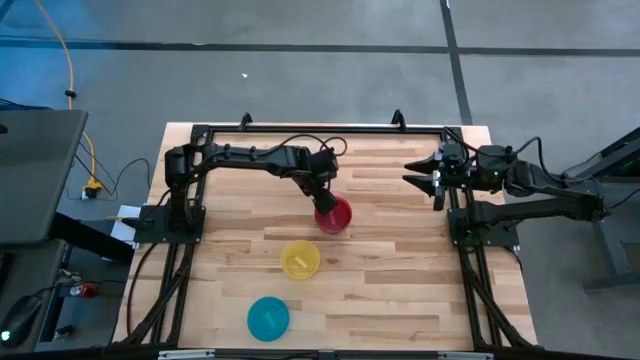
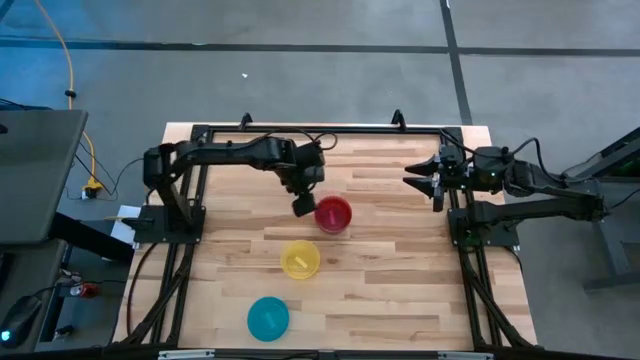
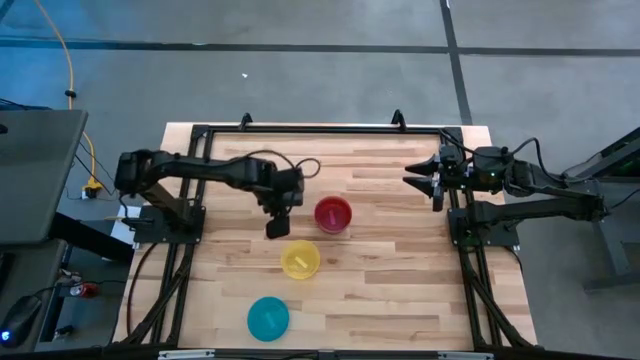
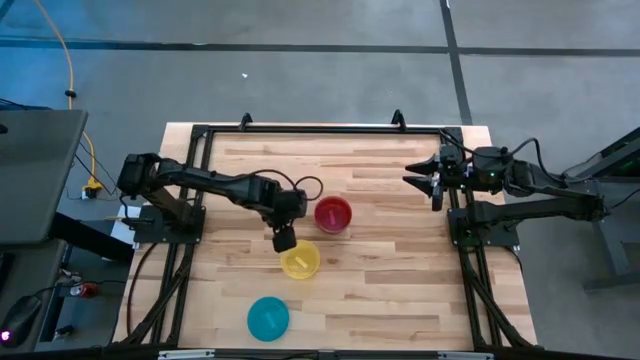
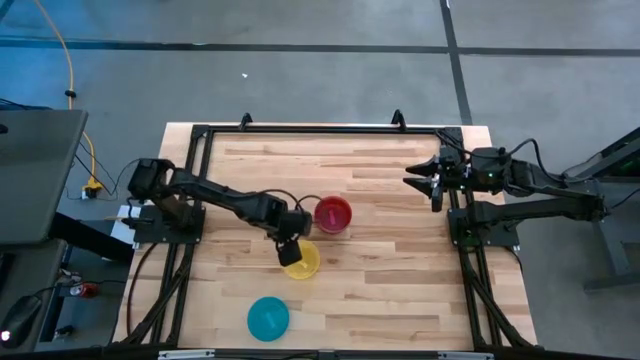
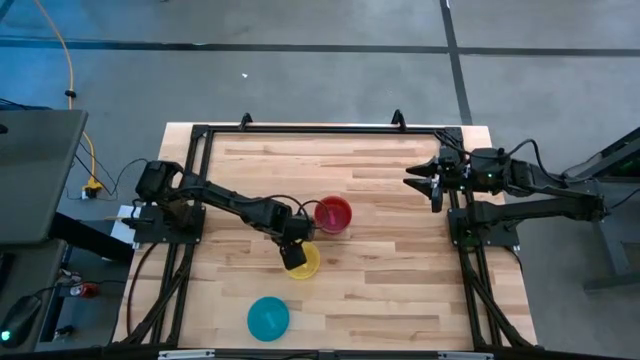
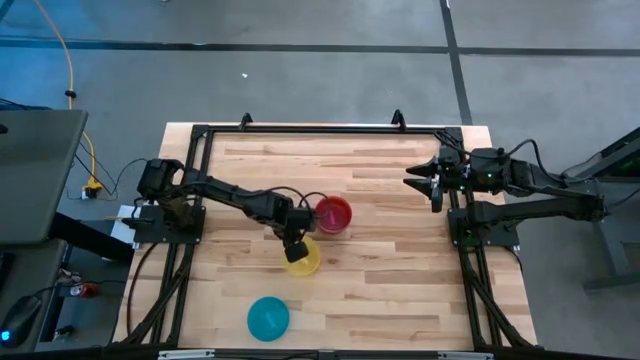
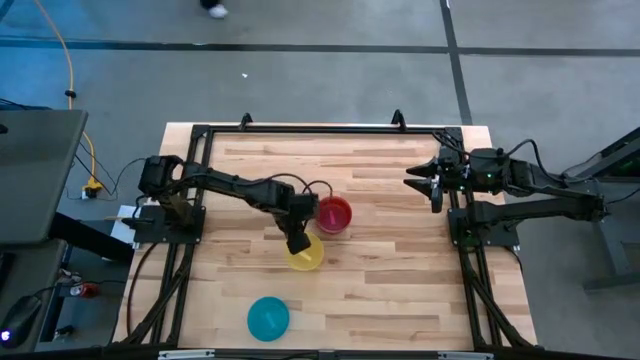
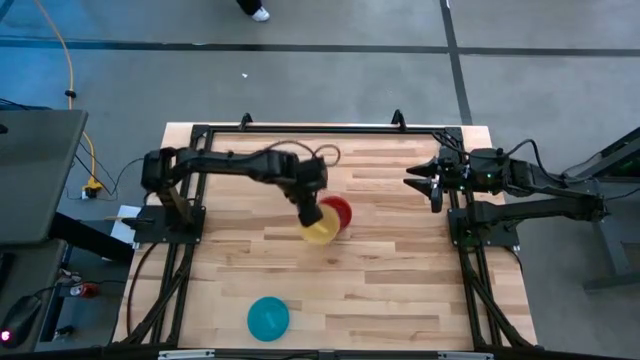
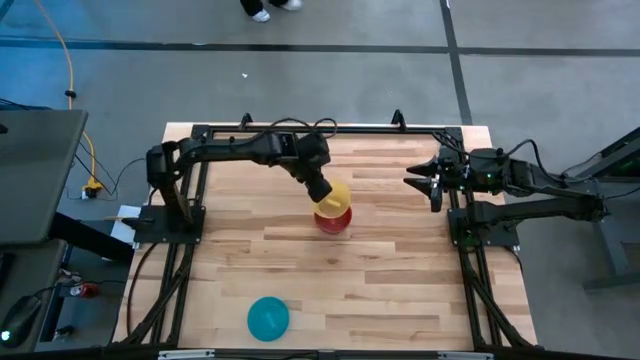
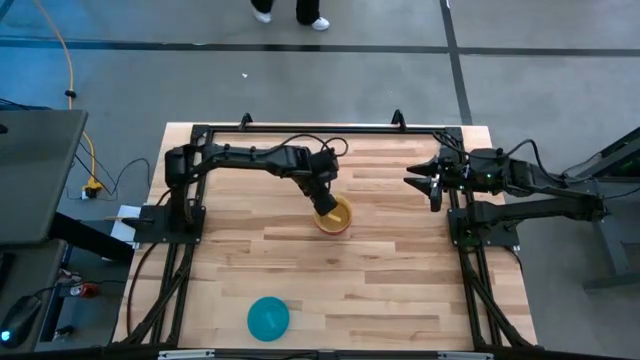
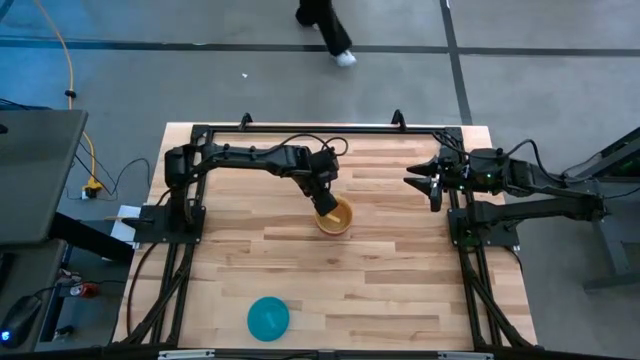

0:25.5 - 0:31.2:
Task: Nest bowls inside each other
Stack the yellow bowl on the red bowl

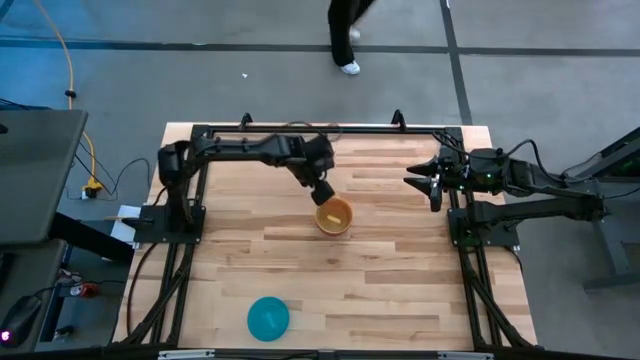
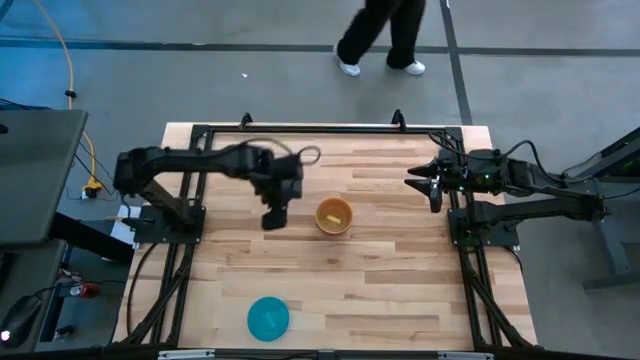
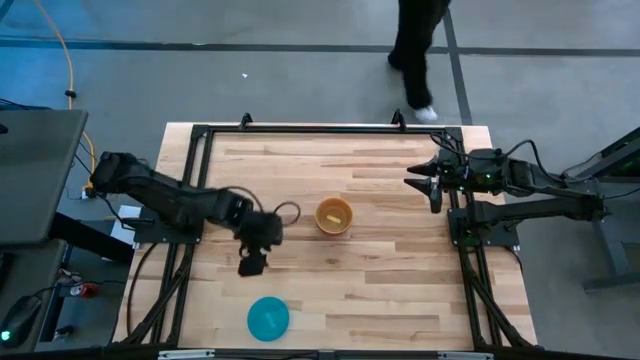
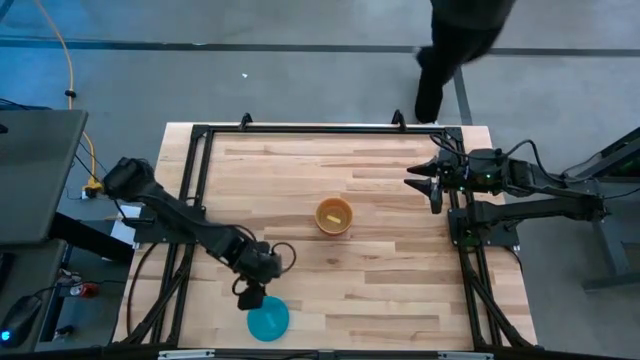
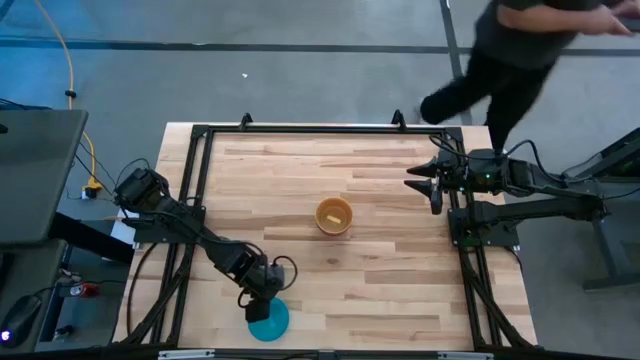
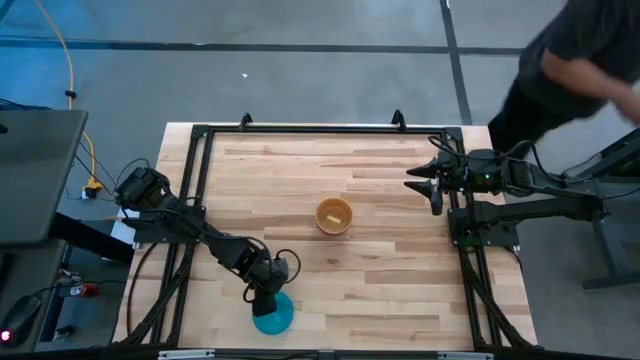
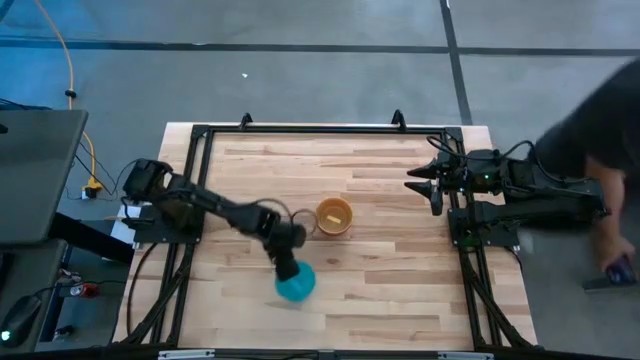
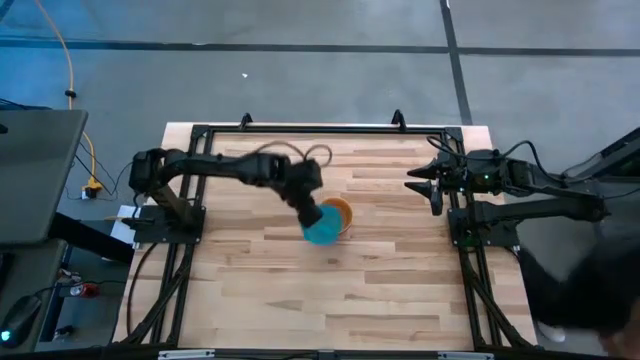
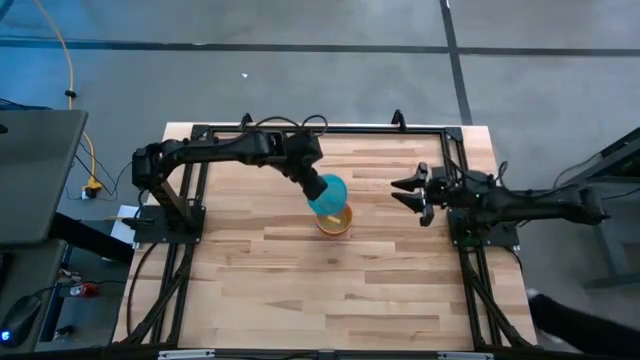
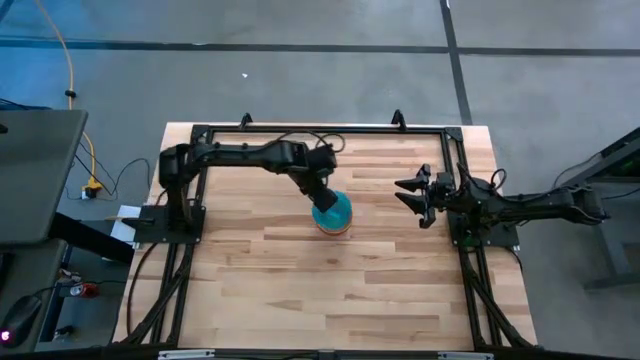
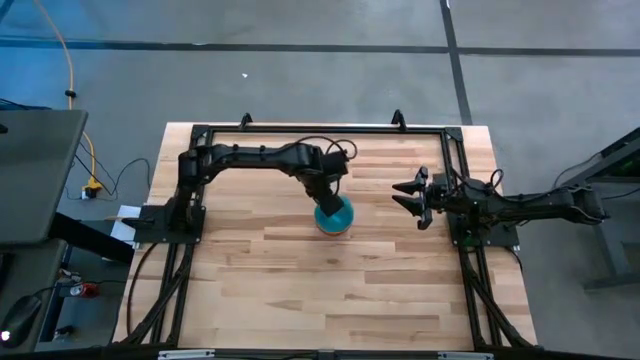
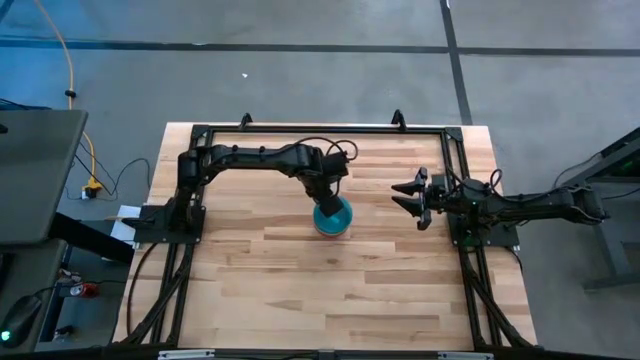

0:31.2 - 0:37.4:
Stack the blue bowl on the yellow bowl

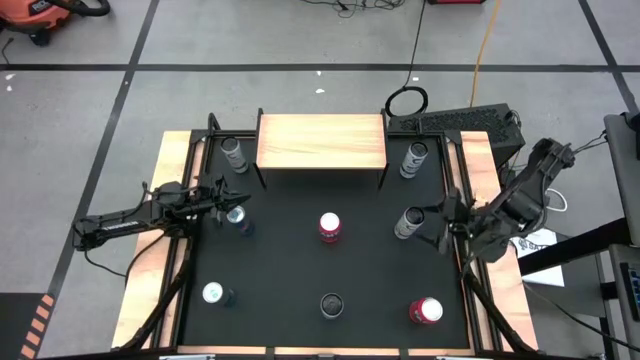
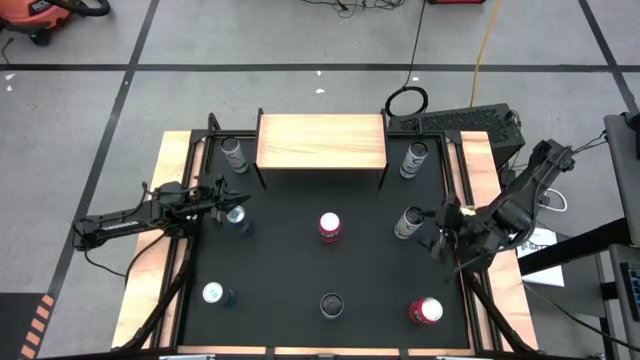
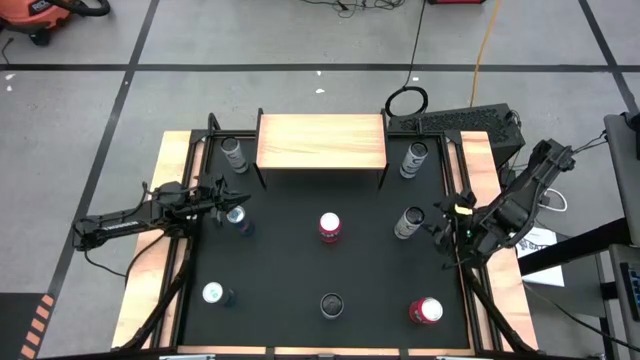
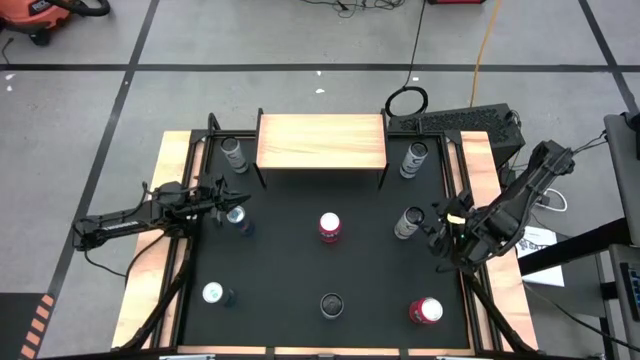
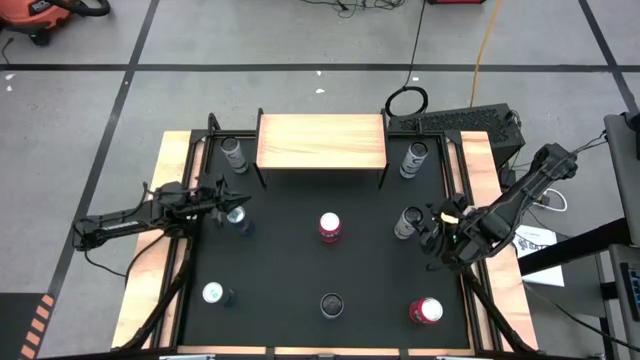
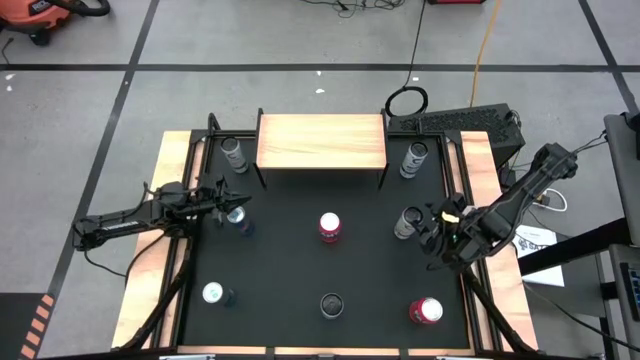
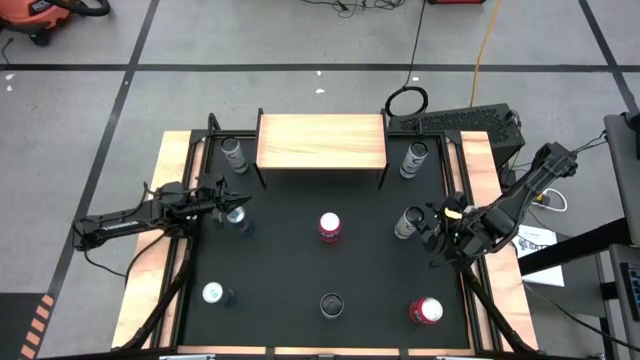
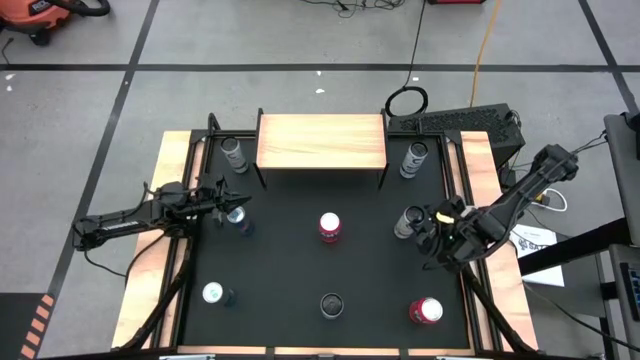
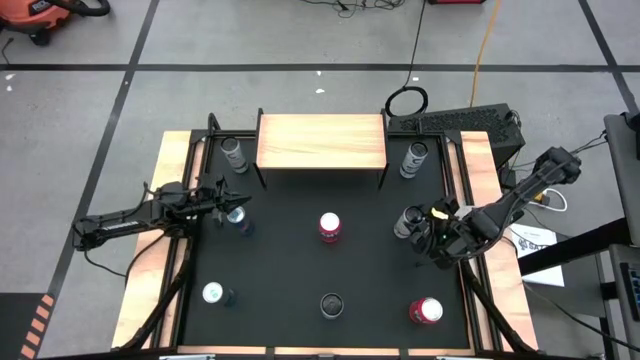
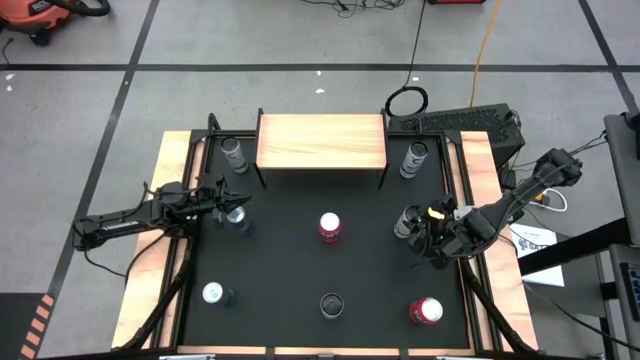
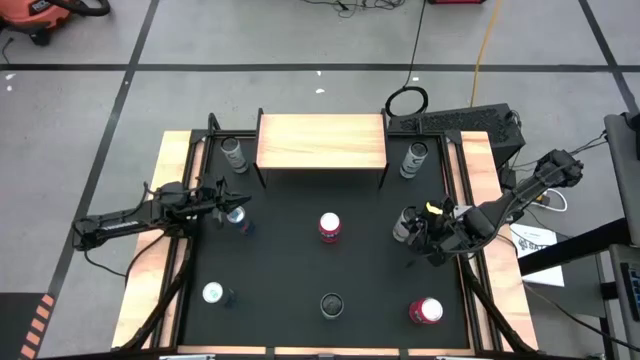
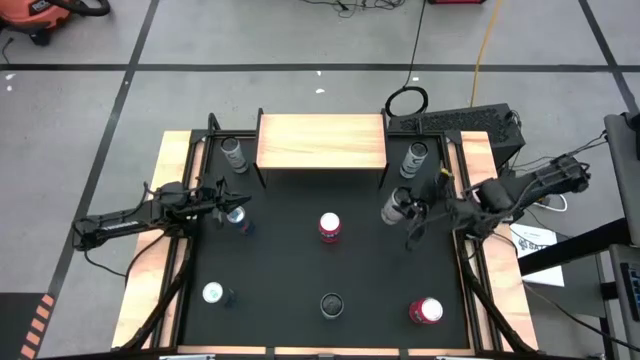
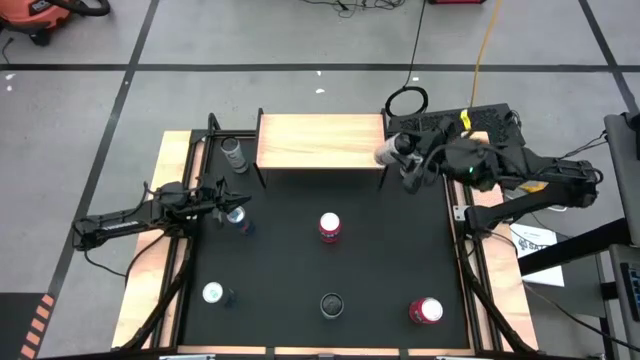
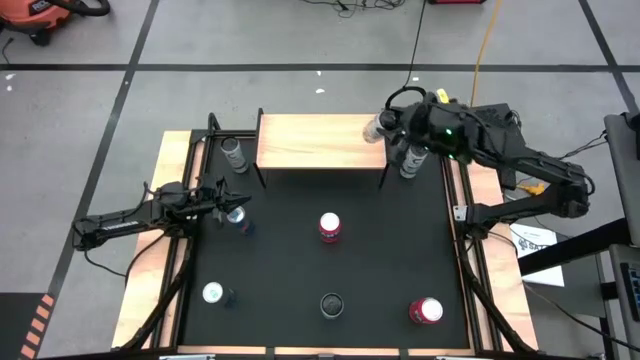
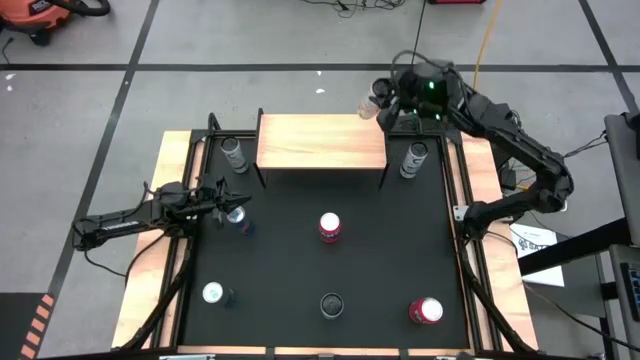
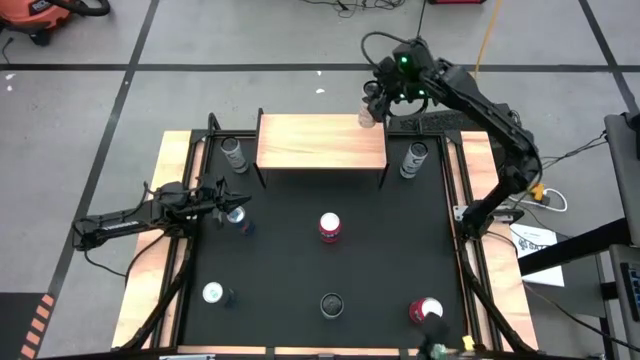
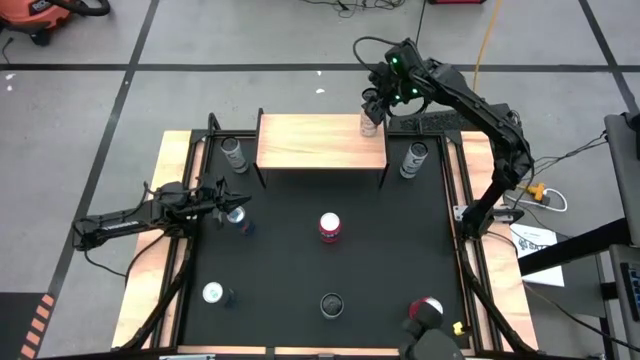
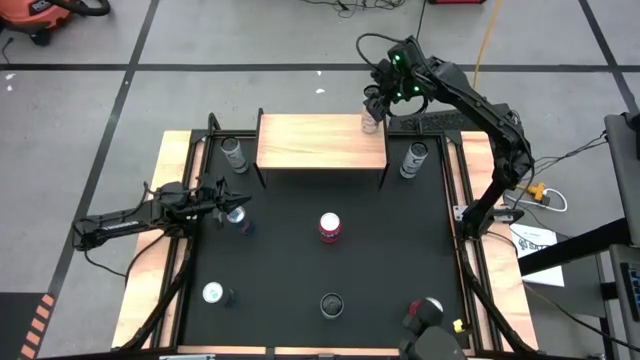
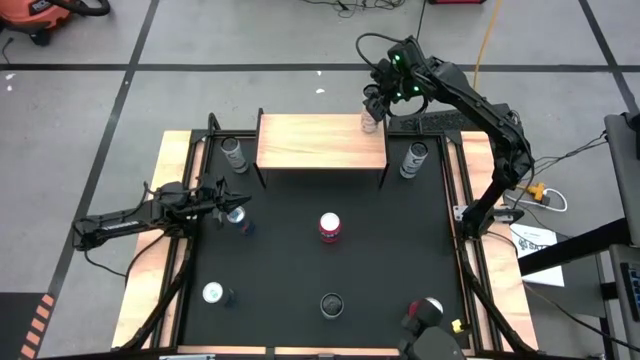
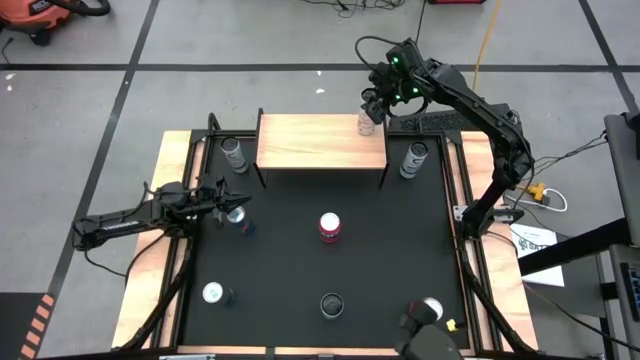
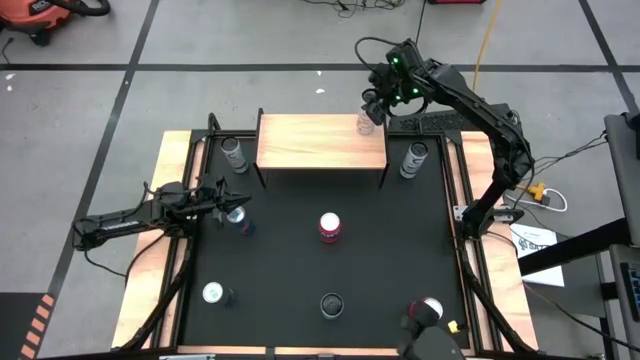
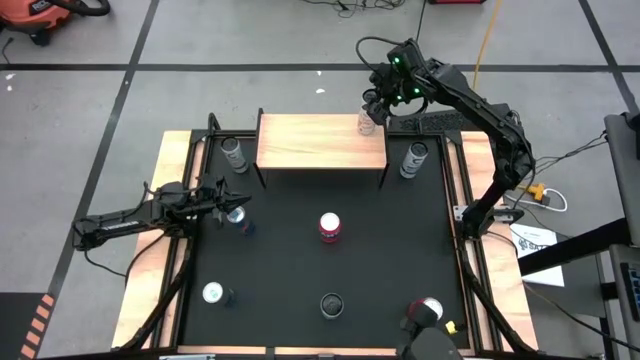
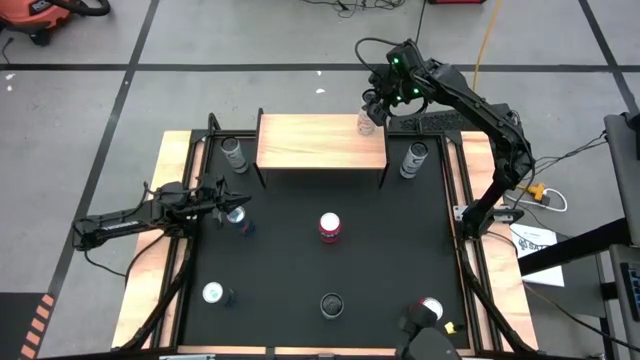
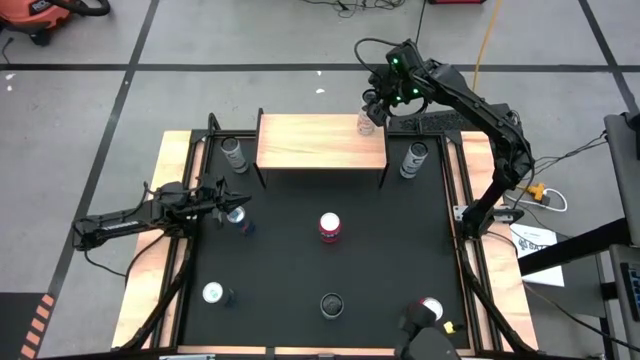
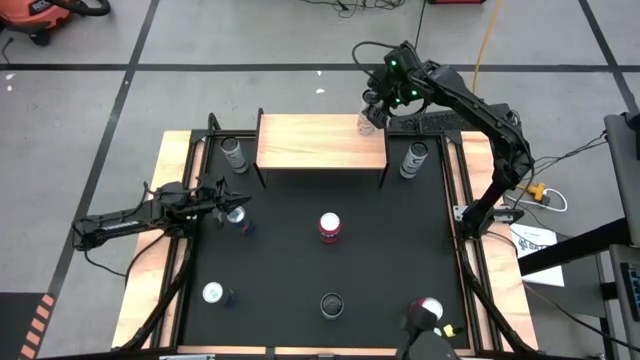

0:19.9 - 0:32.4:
Task: Place canned beverage on shelf
Put the bottom white-yellow soda can on the shelf
